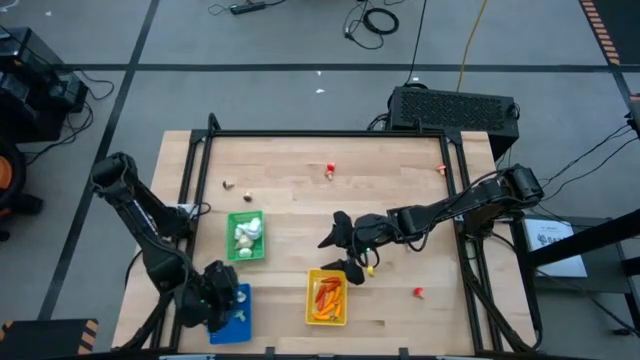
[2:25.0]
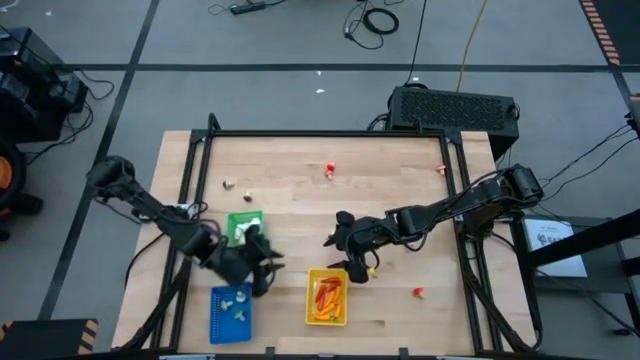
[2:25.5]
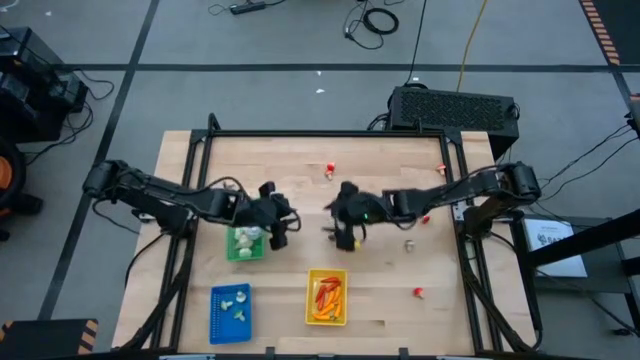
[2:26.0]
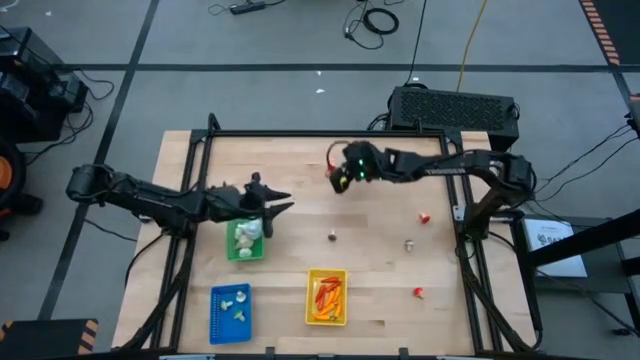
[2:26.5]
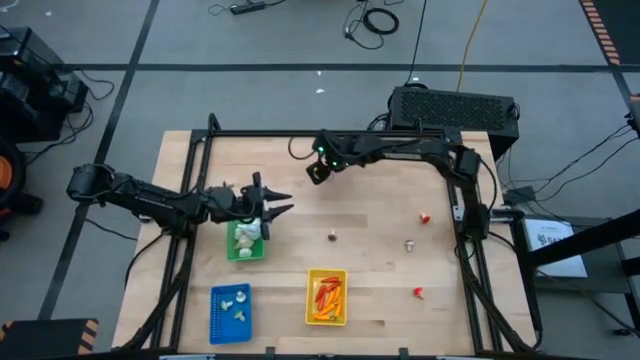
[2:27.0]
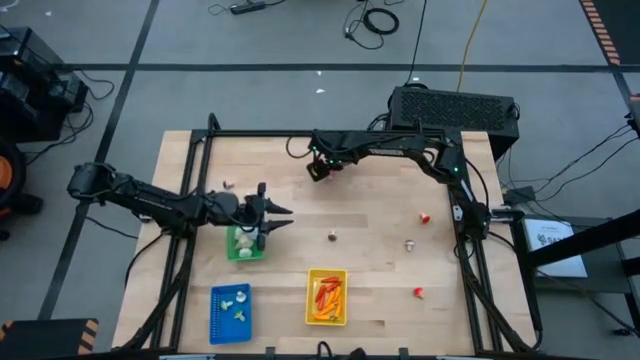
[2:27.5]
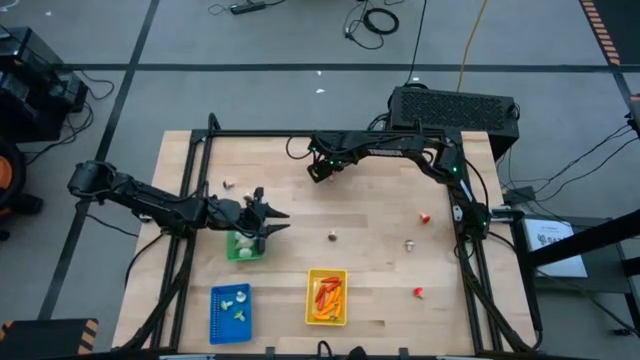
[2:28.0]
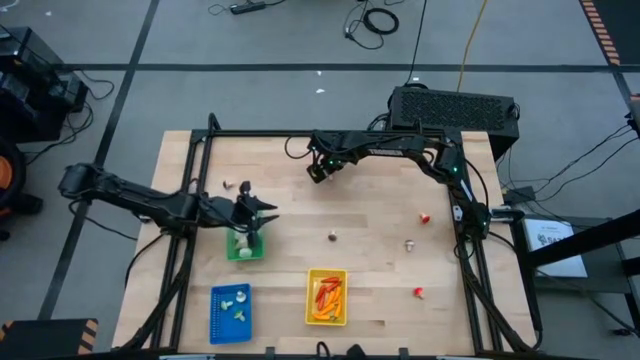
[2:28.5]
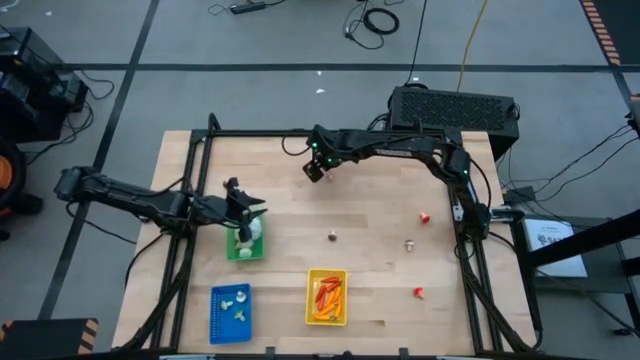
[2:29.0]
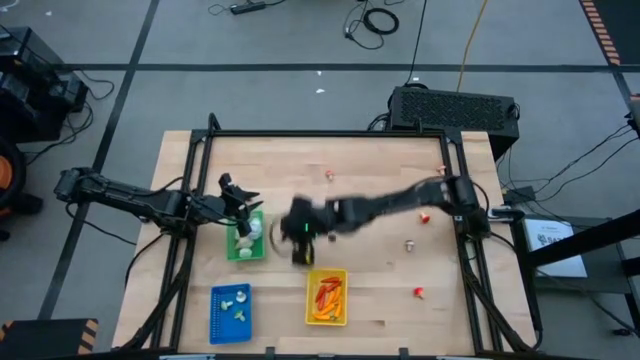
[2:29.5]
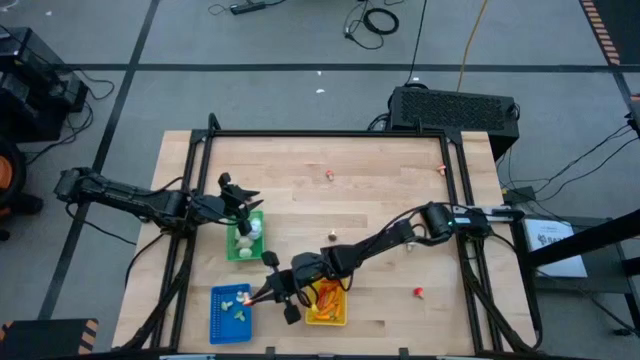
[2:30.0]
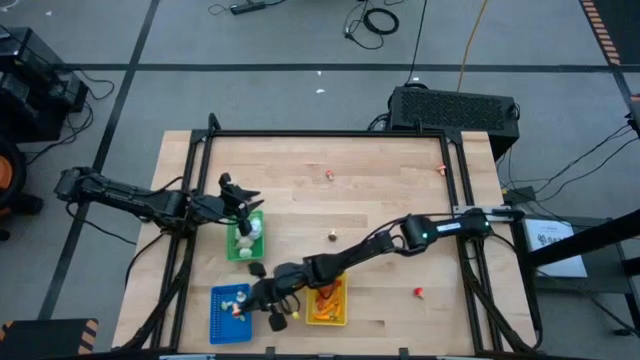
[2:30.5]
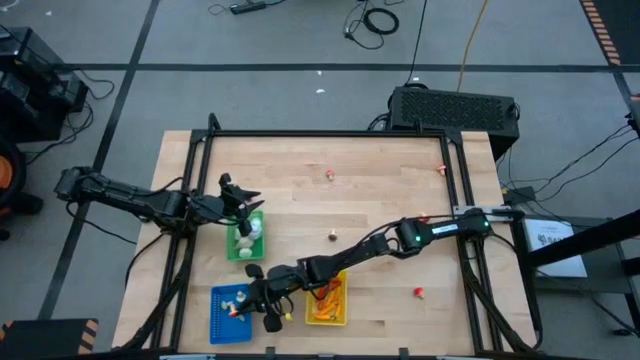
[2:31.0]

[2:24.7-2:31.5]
Task: Sort produce into baskets
Put the red mushroom into the blue basket

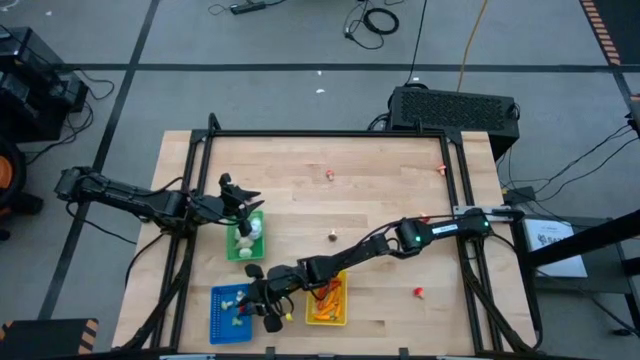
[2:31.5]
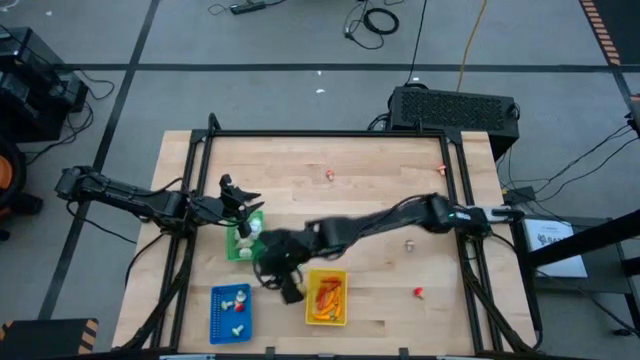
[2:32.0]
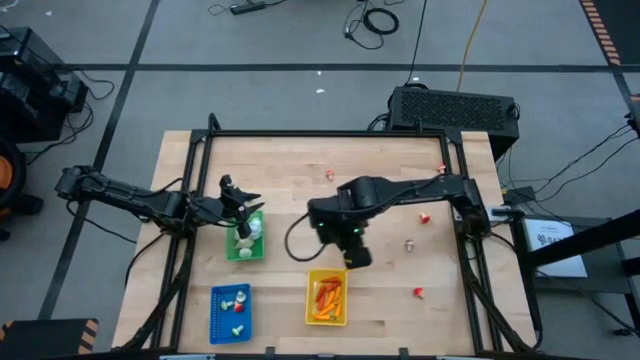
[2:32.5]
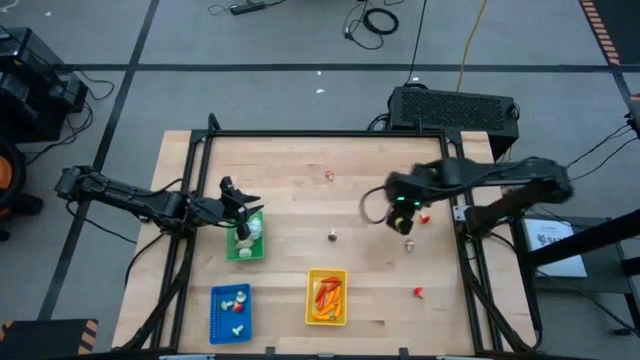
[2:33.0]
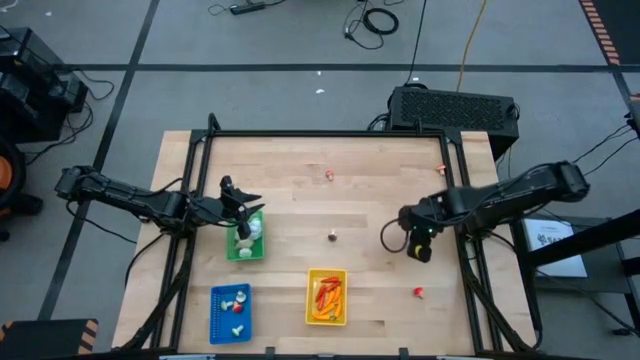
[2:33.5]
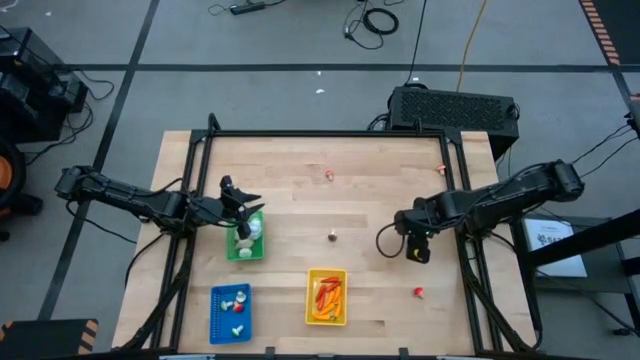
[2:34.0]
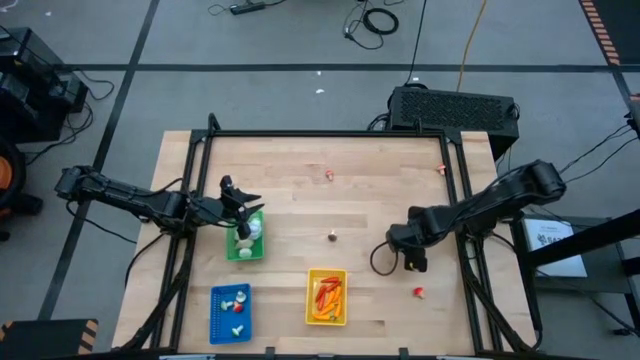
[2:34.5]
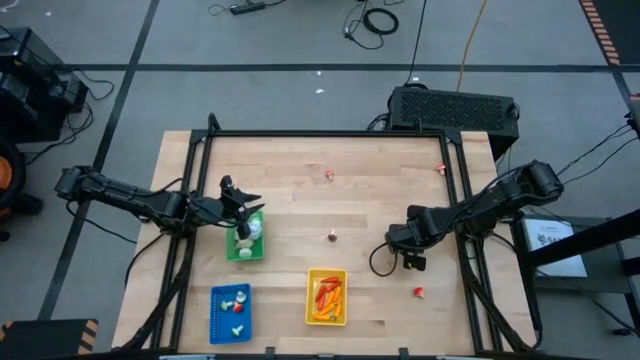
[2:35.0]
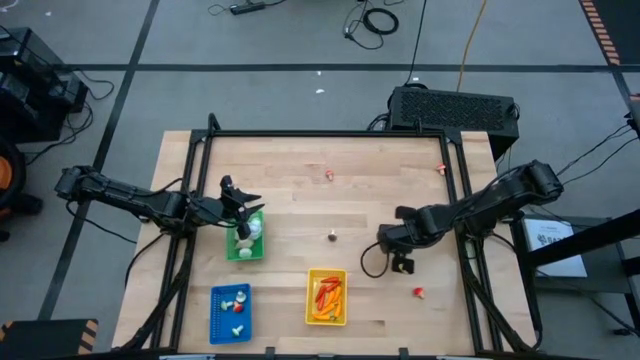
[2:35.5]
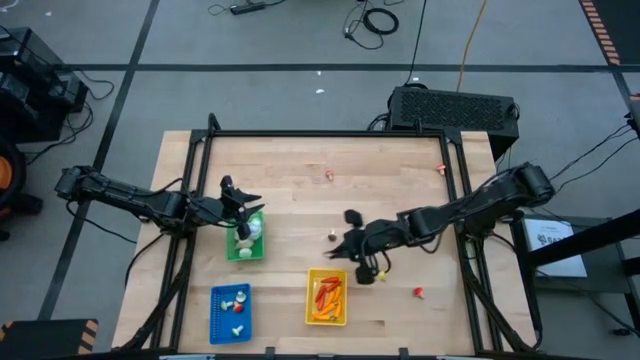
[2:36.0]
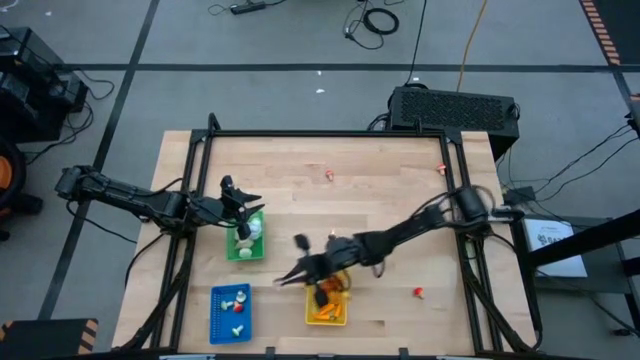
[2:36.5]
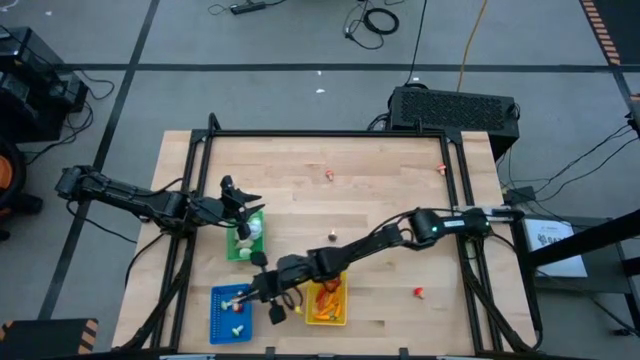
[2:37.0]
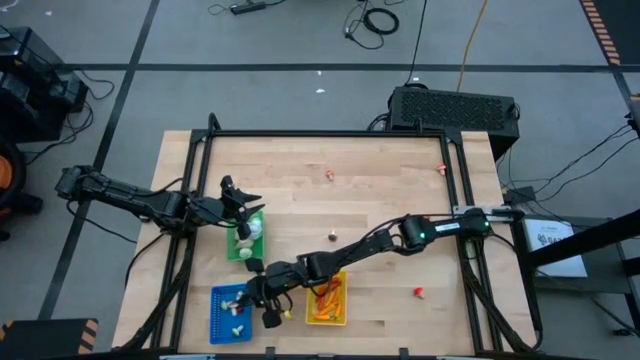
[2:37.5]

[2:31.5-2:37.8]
Put the brown mushroom into the blue basket

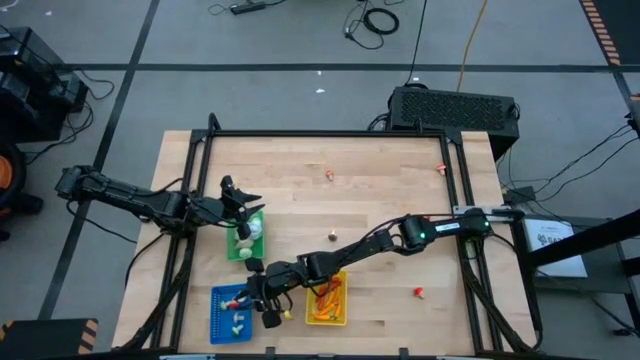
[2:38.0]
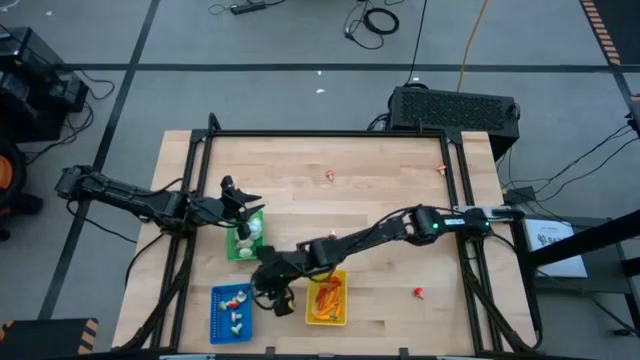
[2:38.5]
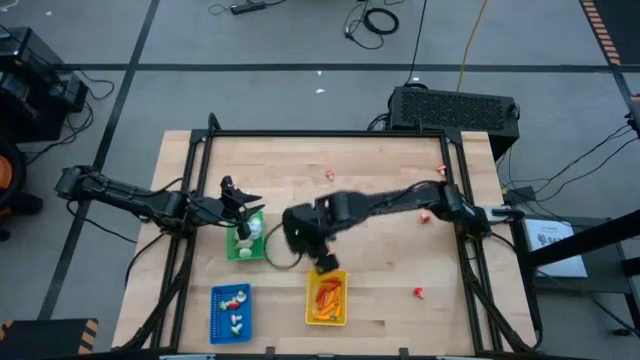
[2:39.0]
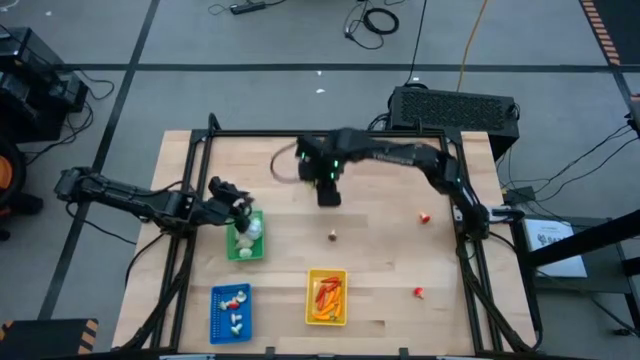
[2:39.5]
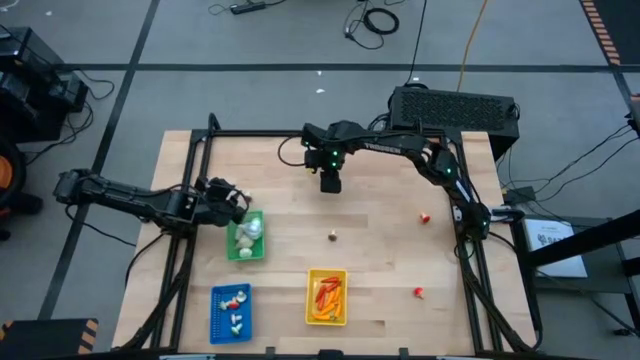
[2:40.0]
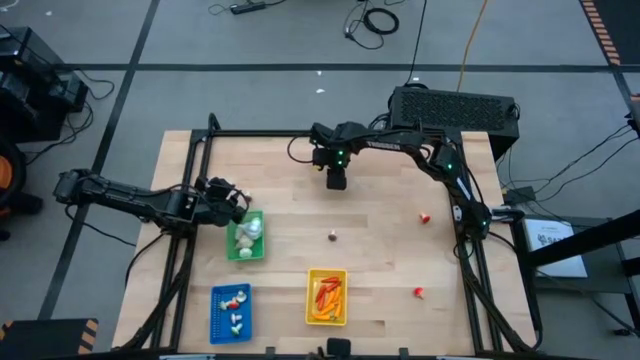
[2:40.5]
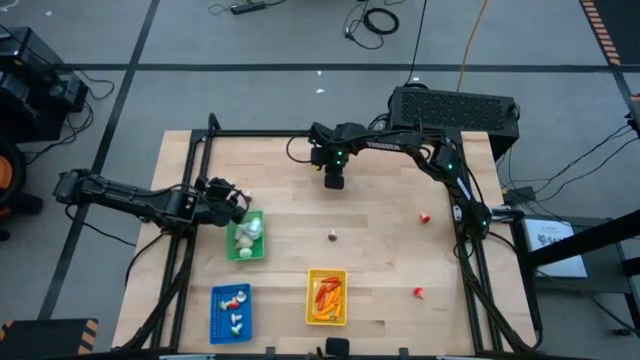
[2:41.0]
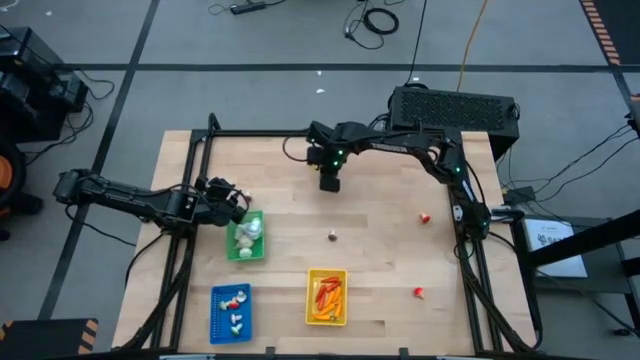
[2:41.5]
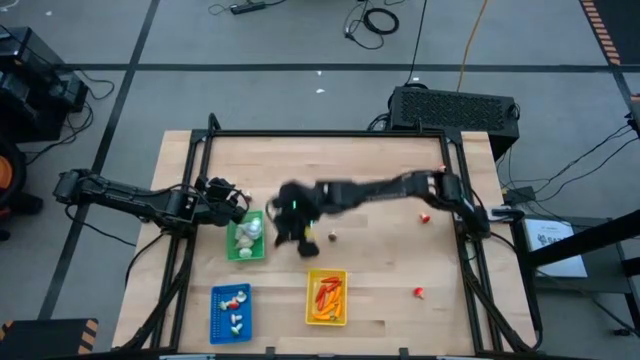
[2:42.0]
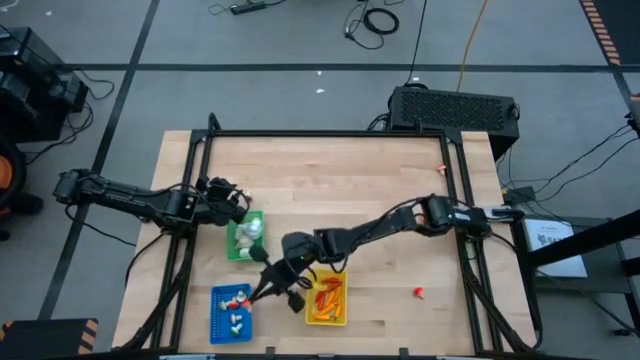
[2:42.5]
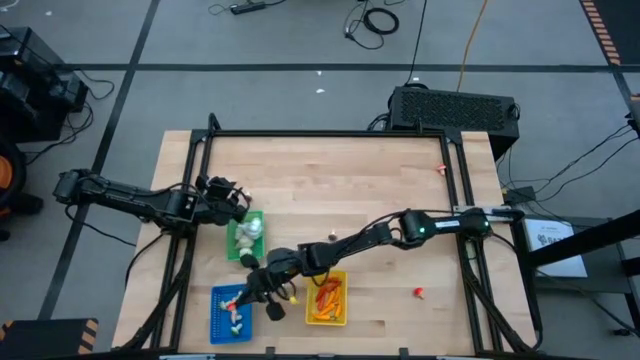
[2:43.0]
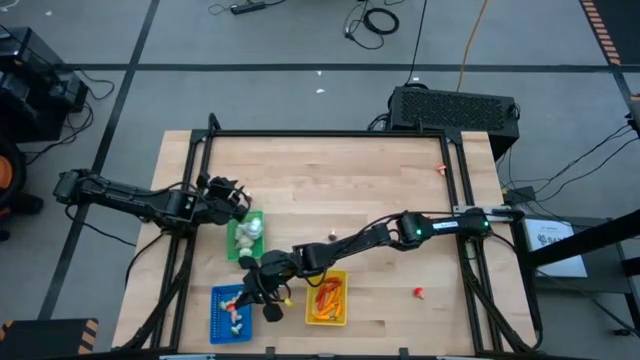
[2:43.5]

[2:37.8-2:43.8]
Put the red mushroom into the blue basket

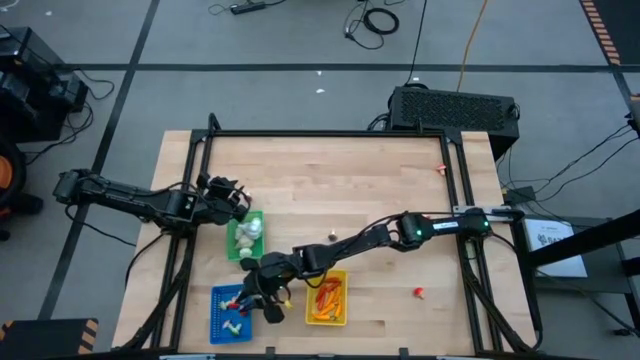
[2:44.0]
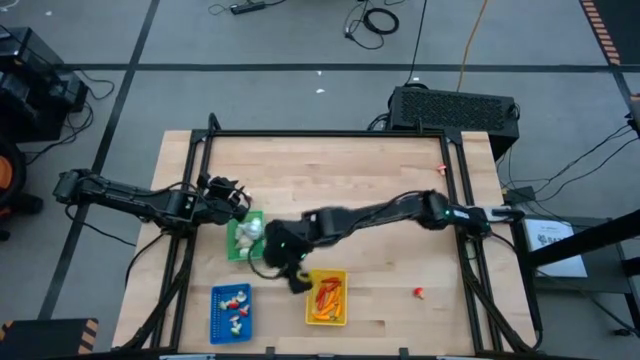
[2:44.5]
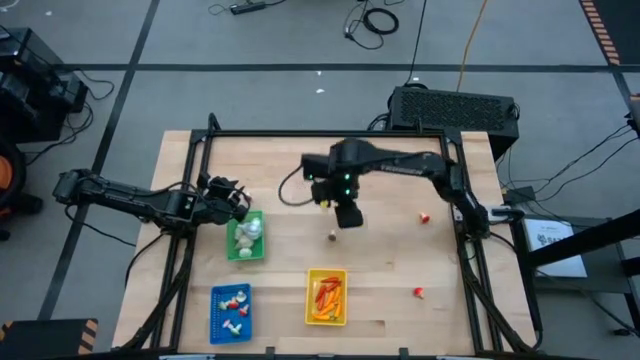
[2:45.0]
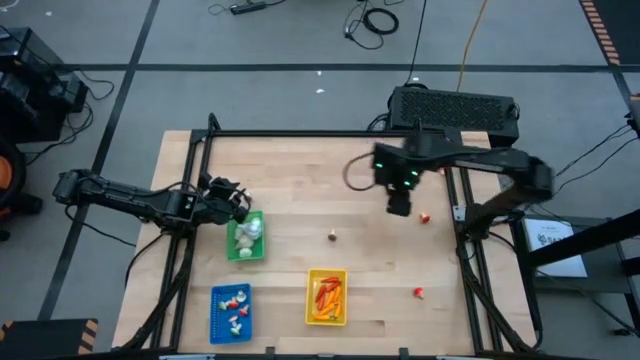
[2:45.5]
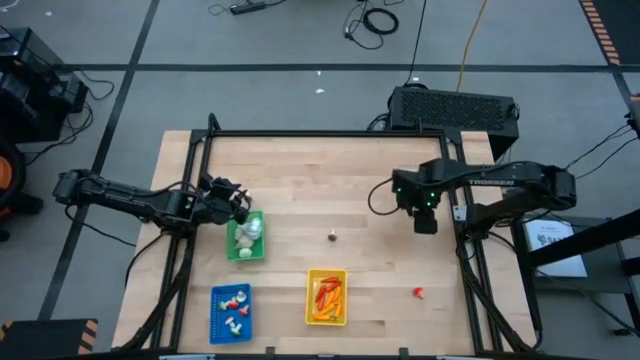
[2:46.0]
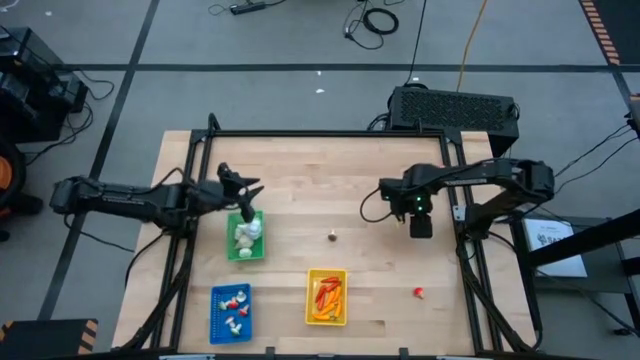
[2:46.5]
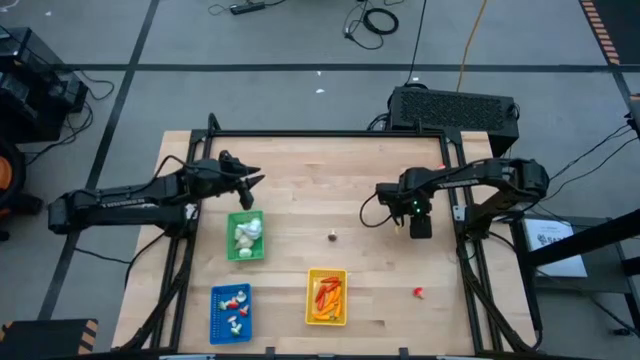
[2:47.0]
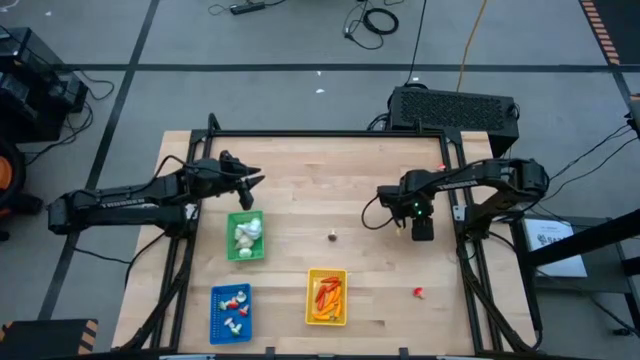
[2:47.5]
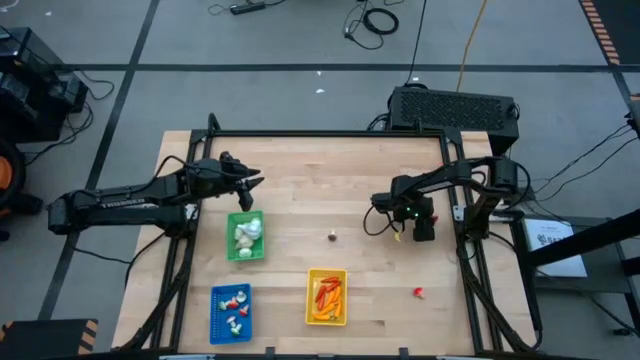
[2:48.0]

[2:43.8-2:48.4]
Put the red mushroom into the blue basket
